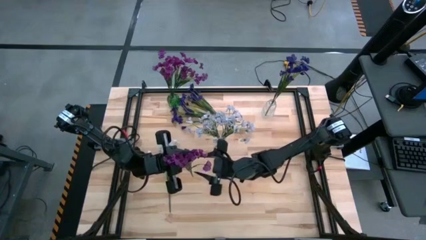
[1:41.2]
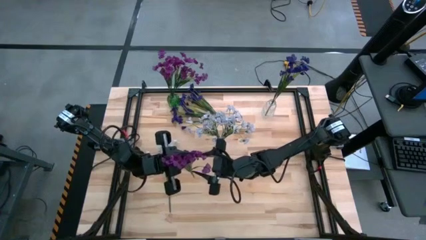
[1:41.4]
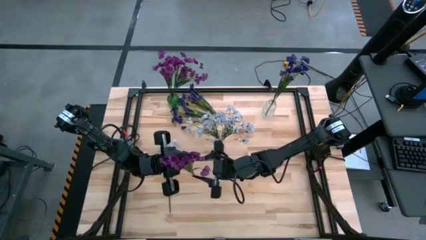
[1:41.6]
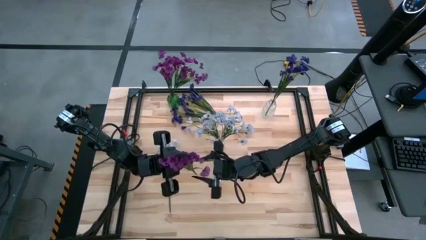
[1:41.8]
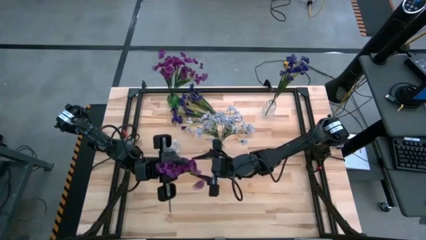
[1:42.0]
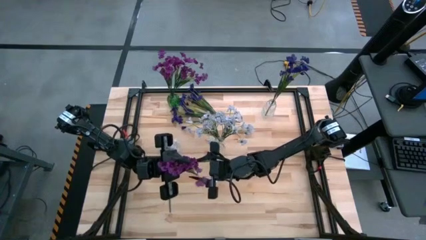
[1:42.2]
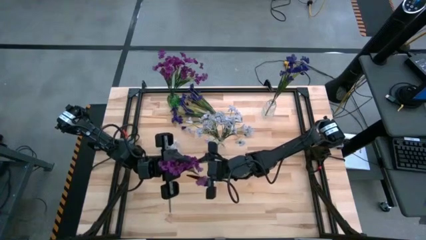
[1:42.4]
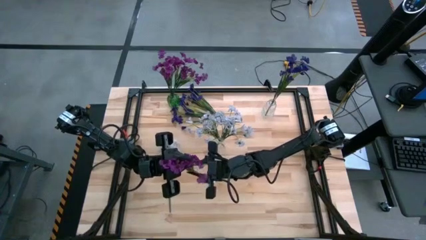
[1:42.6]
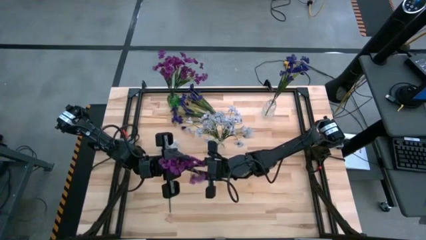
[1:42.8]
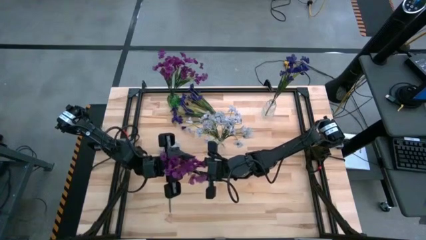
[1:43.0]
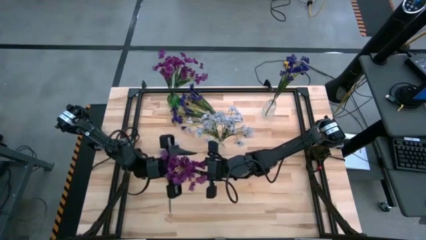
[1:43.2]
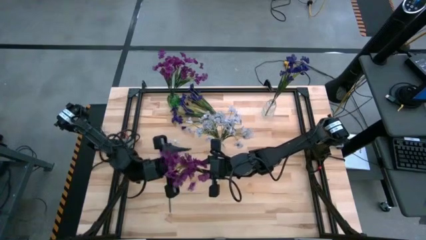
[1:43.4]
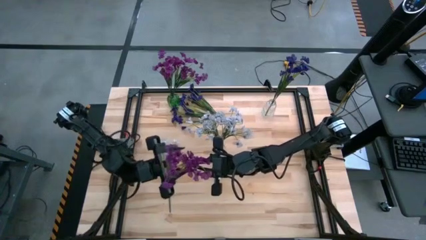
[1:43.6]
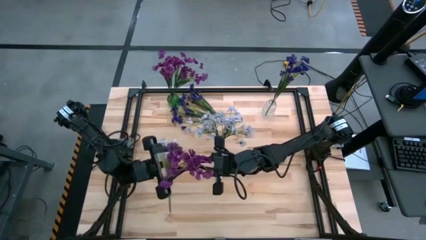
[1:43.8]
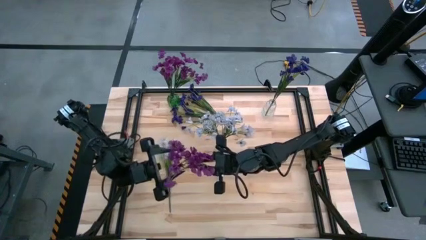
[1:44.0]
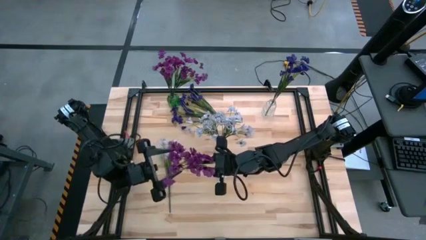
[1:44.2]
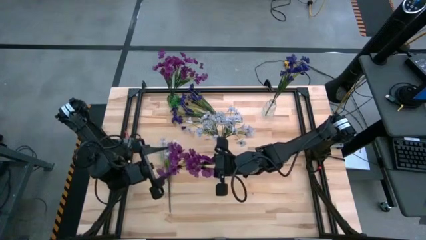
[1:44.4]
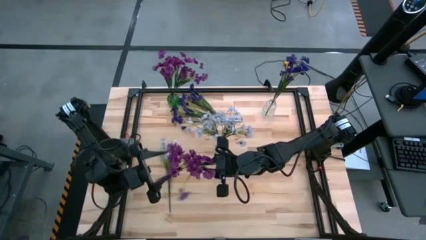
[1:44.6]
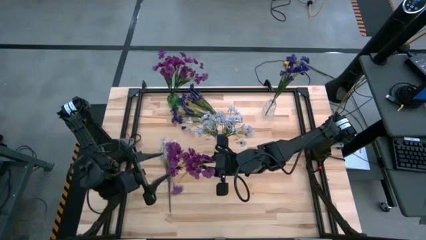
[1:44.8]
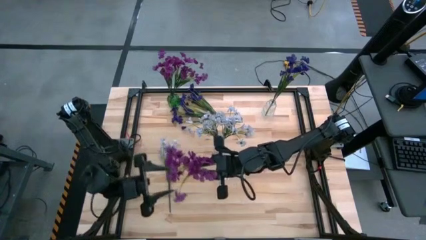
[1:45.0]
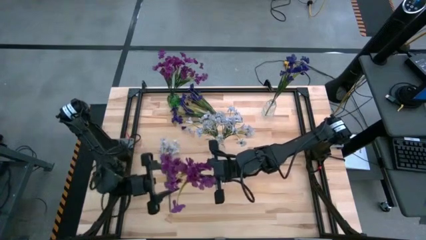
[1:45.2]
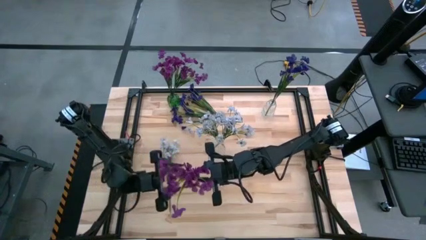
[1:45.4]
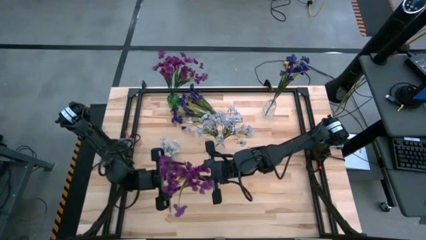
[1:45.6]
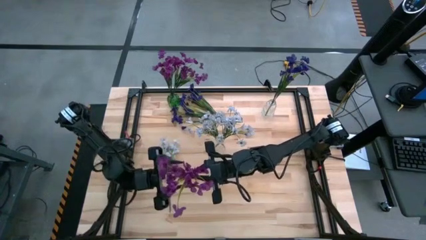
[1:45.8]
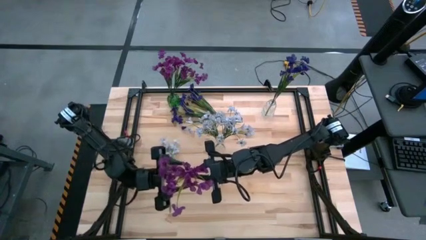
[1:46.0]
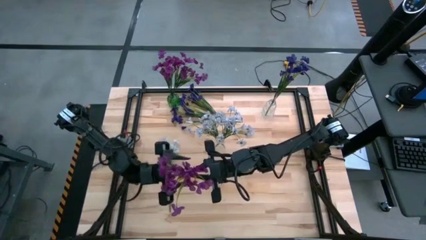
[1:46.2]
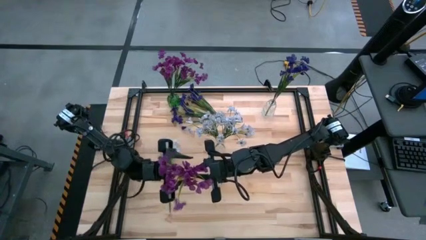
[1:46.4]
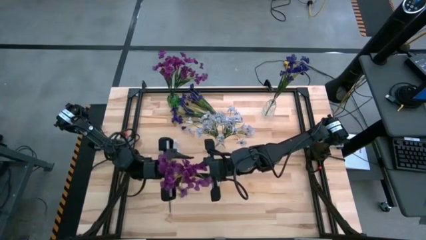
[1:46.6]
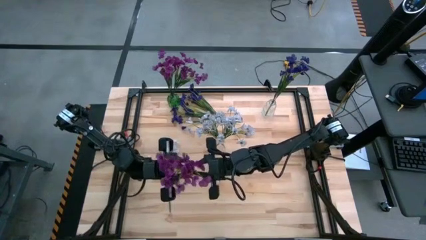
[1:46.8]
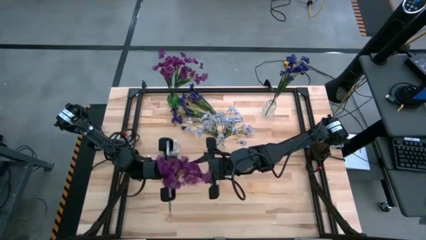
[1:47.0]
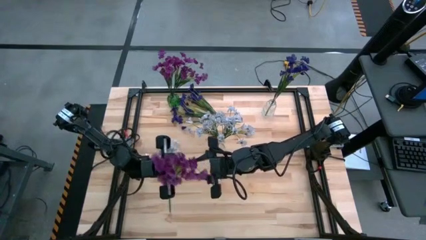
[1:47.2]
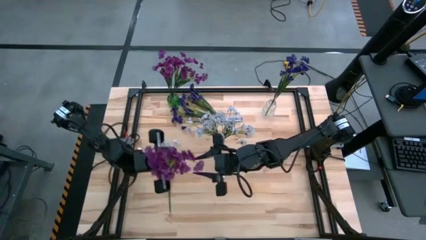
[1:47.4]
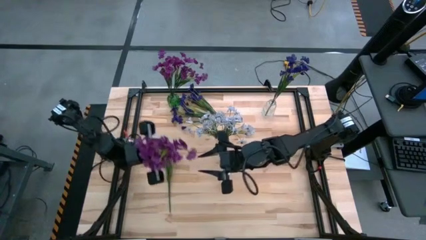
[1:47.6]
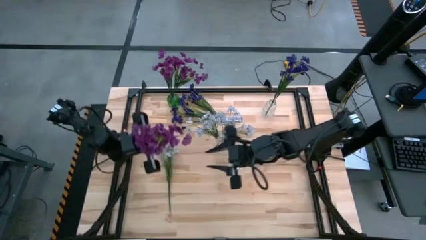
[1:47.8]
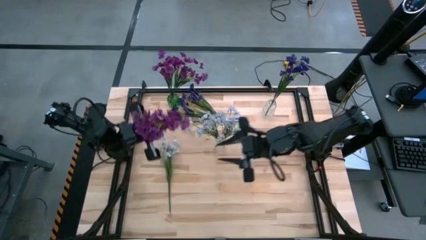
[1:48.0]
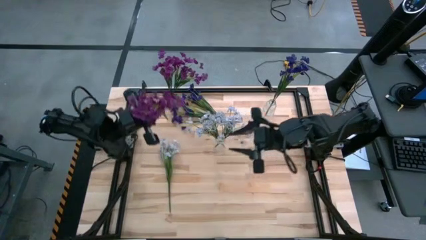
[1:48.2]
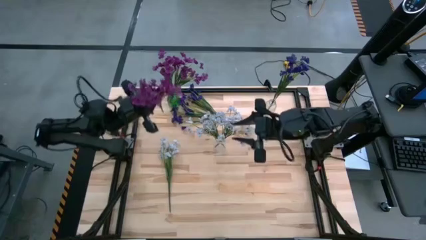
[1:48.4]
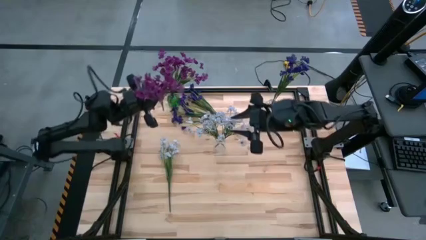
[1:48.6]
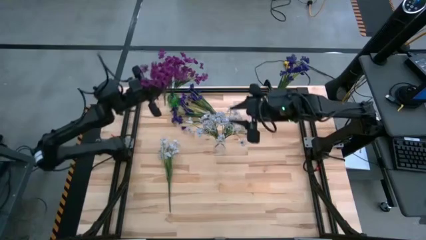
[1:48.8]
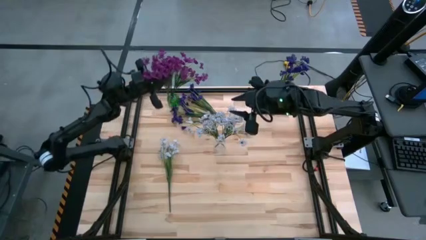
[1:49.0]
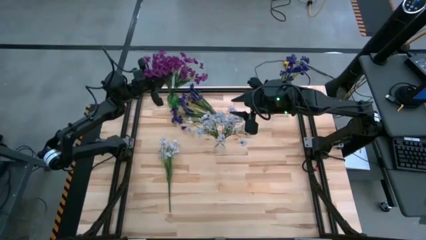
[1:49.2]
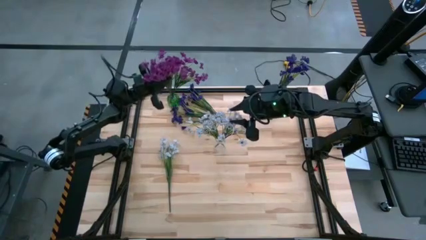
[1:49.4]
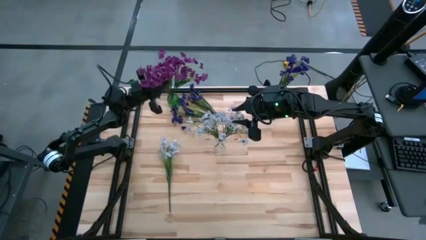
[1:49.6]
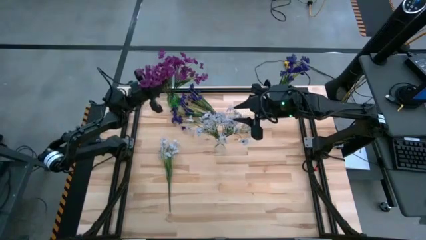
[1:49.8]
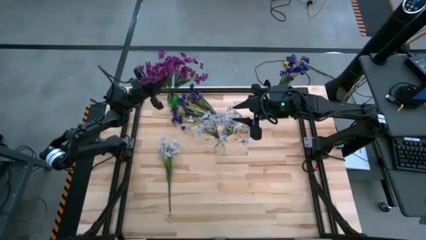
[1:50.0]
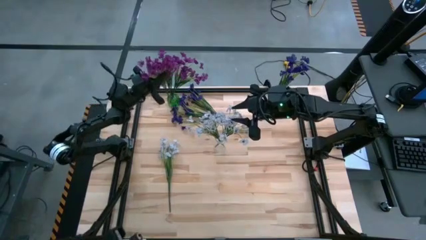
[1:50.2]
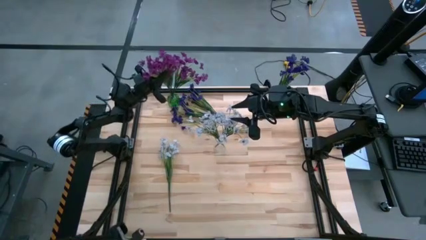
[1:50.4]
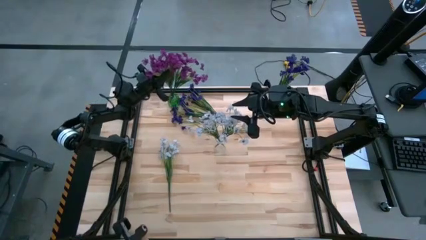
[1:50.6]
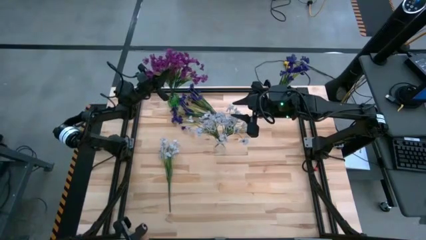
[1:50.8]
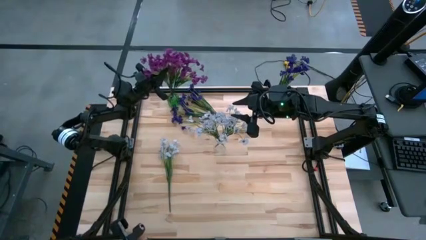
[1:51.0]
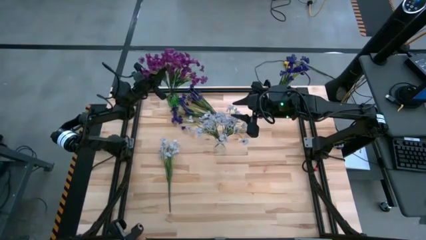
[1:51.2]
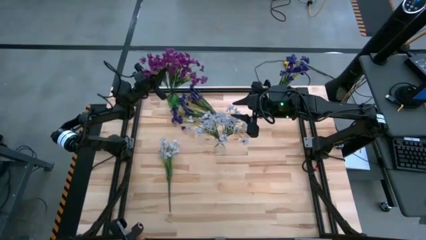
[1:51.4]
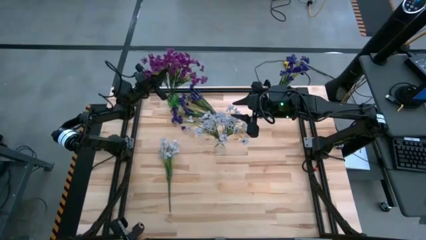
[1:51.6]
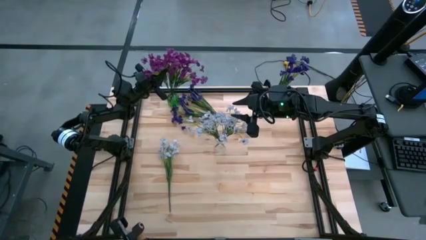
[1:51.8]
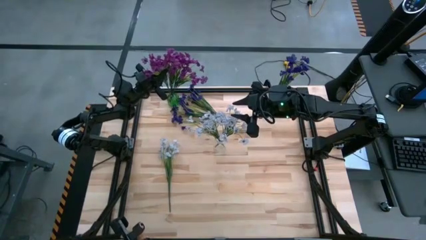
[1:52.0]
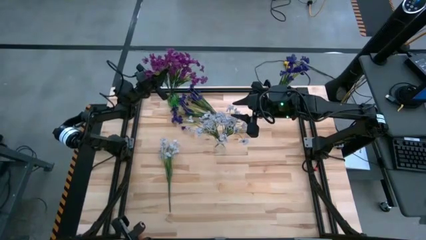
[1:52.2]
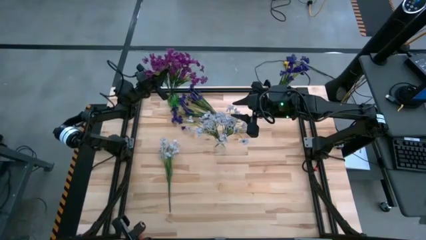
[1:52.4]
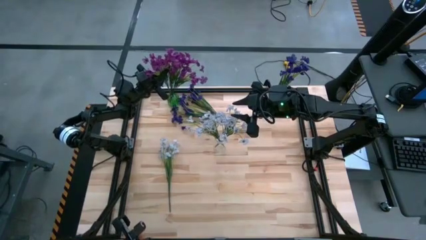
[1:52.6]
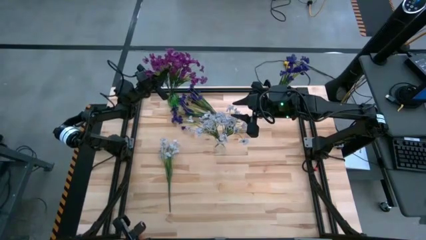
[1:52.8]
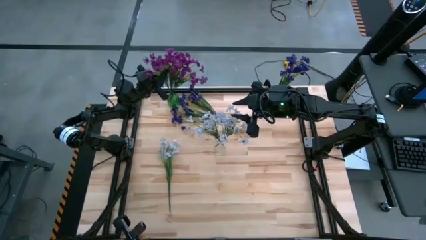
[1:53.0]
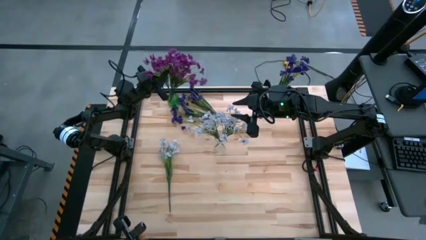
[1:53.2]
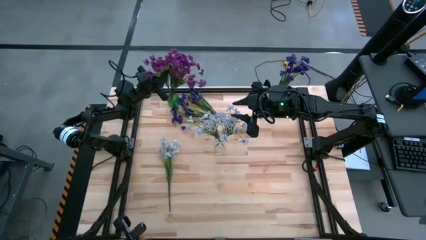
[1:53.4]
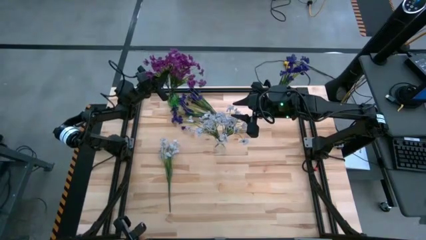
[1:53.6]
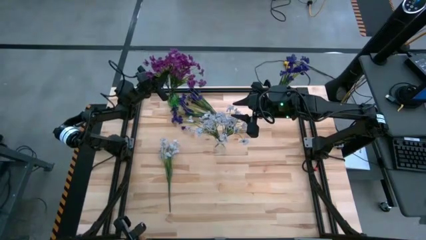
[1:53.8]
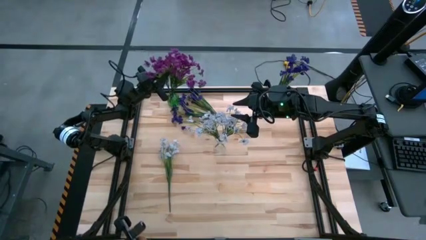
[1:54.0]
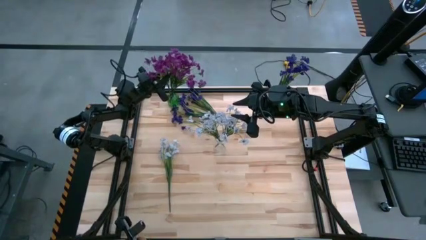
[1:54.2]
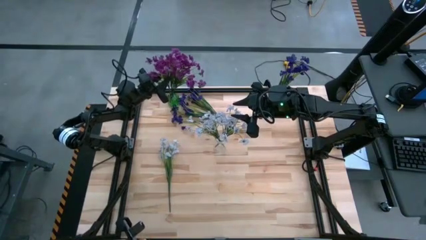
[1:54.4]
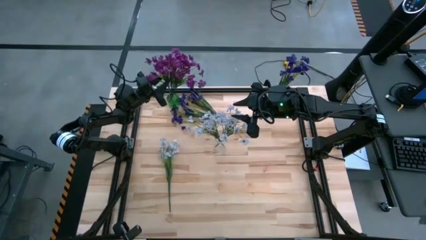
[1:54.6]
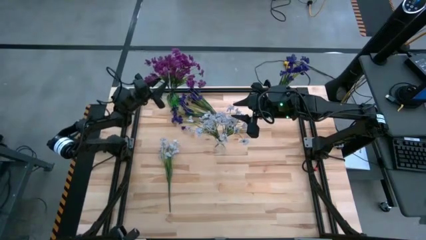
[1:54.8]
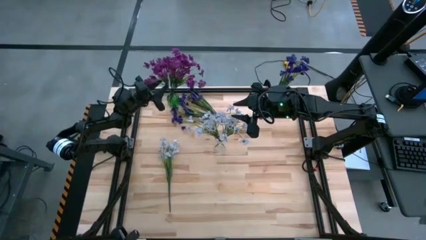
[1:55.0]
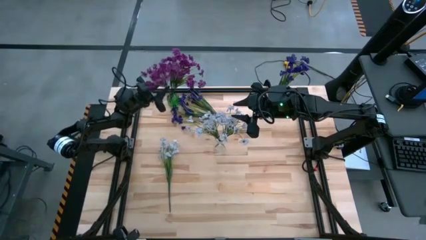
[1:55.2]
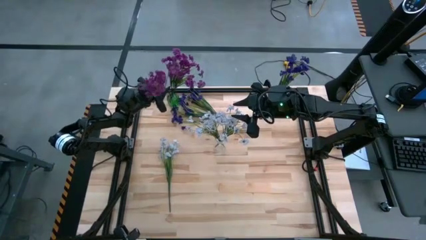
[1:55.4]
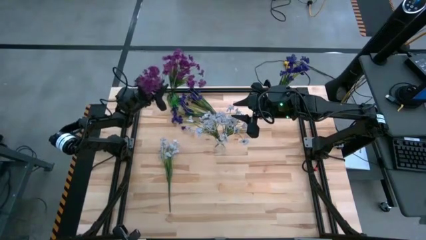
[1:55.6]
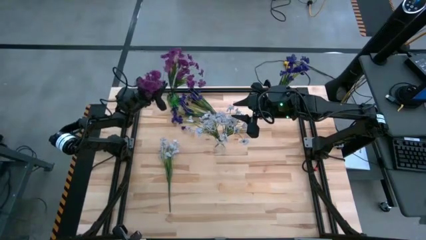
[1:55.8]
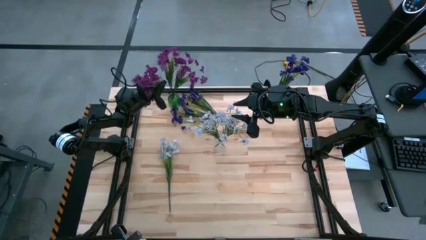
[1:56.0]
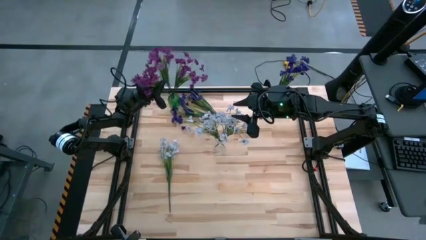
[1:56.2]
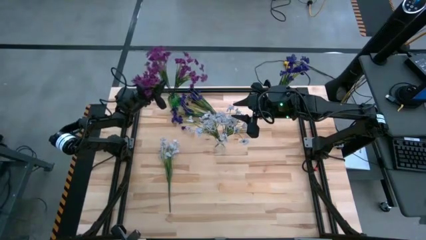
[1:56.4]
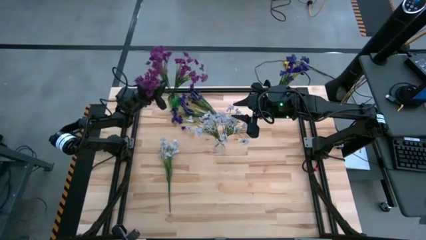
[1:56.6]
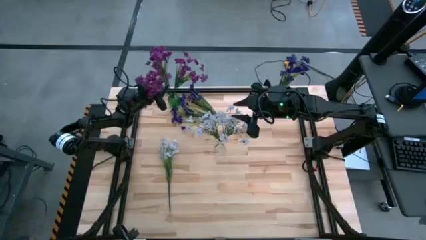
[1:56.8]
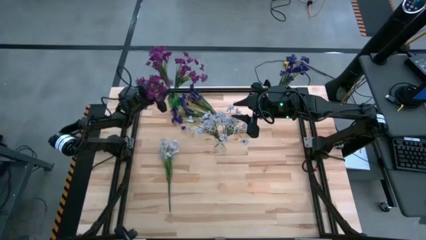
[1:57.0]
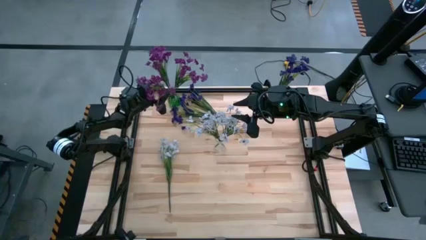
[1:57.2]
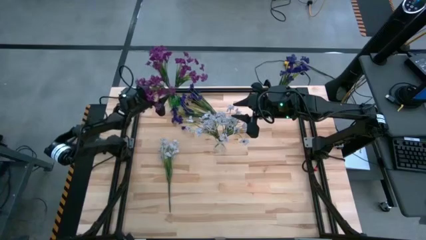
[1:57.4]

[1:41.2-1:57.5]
Task: Sort flowers into vase by color
Put the violet flowers into the green flower vase
